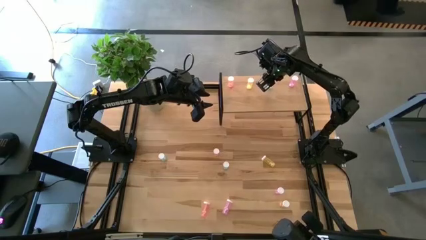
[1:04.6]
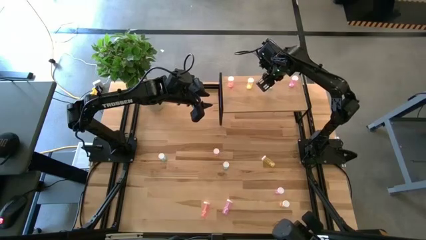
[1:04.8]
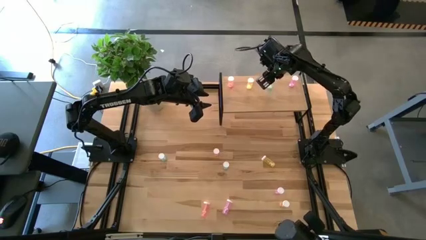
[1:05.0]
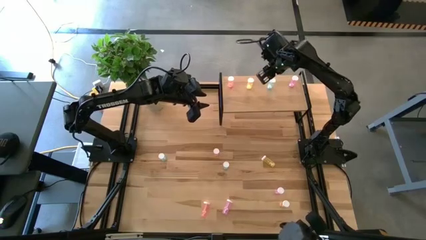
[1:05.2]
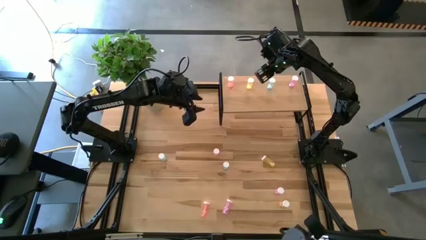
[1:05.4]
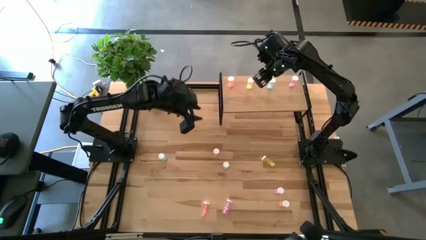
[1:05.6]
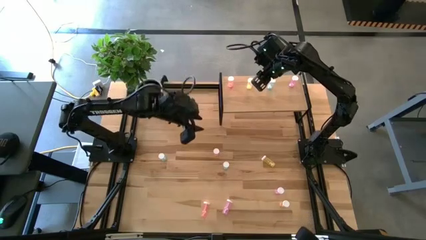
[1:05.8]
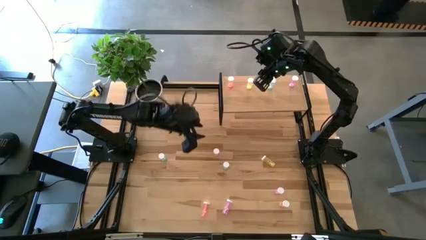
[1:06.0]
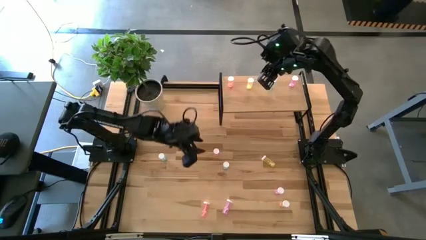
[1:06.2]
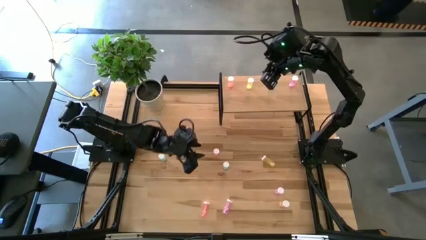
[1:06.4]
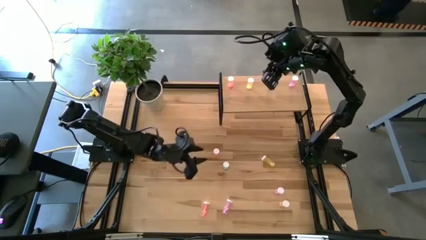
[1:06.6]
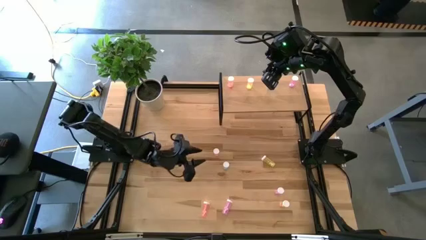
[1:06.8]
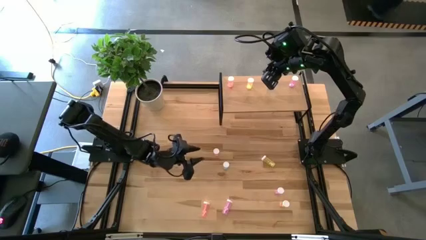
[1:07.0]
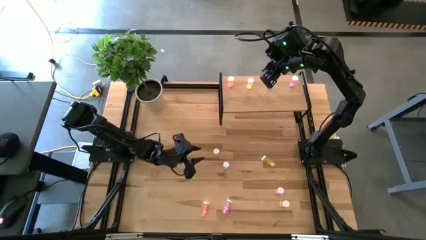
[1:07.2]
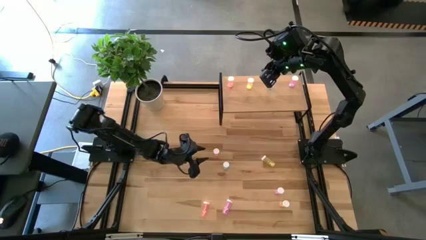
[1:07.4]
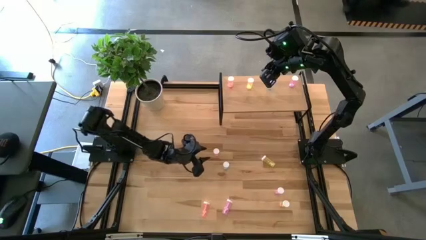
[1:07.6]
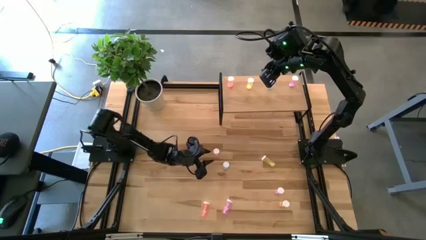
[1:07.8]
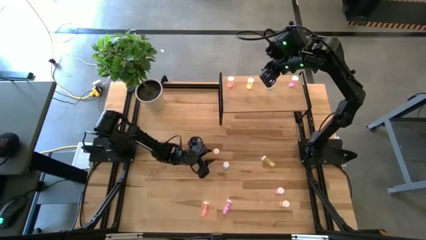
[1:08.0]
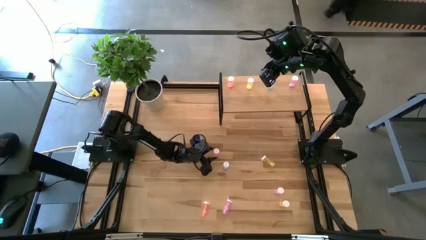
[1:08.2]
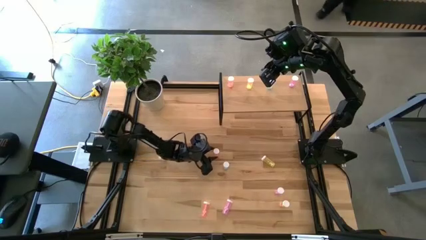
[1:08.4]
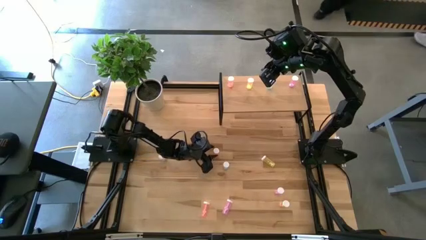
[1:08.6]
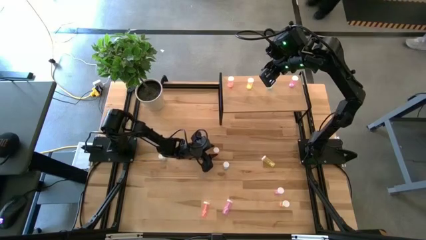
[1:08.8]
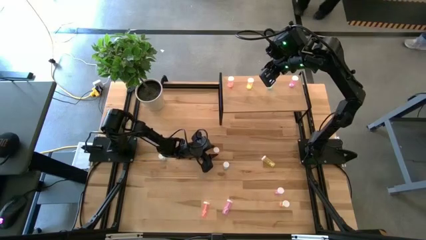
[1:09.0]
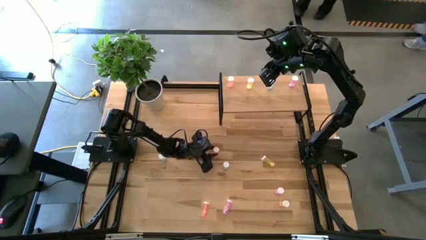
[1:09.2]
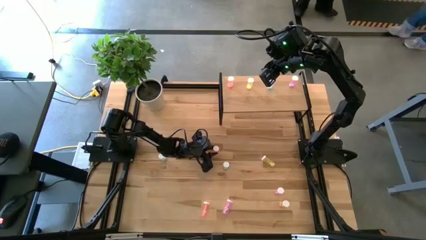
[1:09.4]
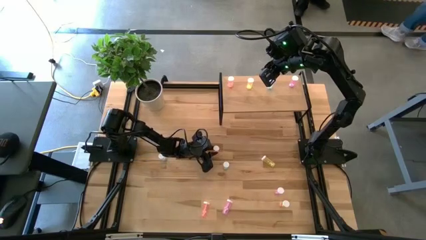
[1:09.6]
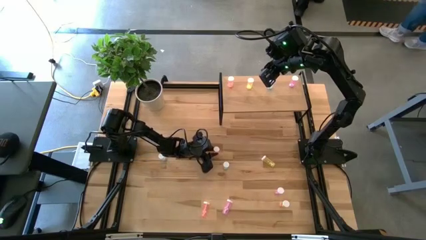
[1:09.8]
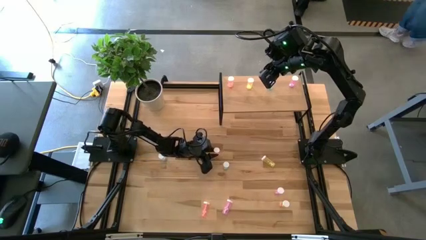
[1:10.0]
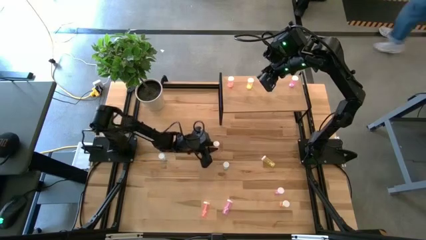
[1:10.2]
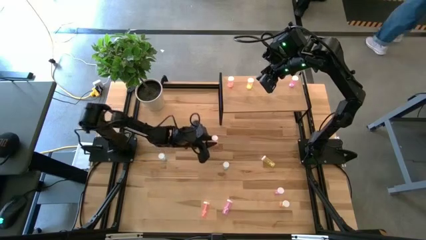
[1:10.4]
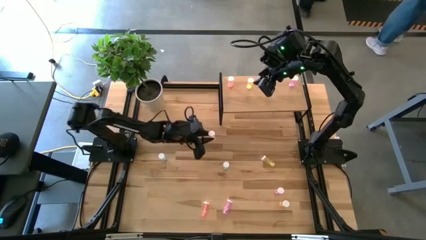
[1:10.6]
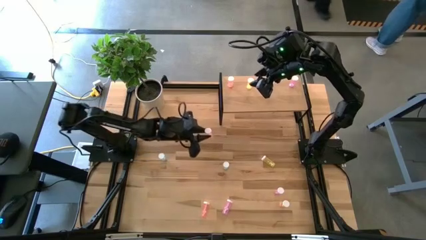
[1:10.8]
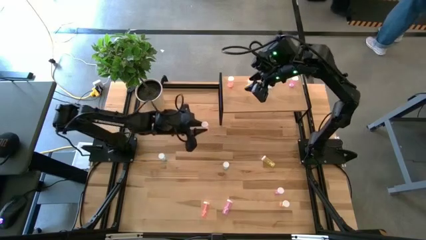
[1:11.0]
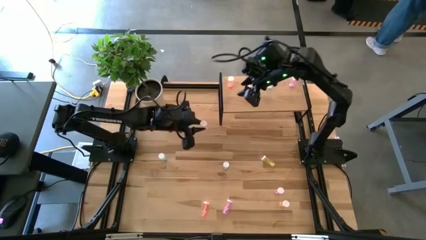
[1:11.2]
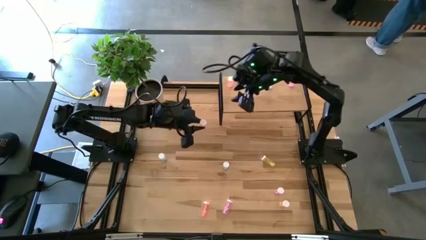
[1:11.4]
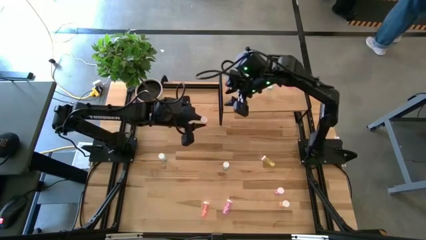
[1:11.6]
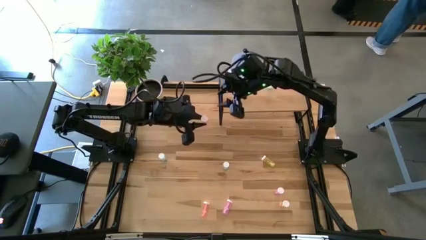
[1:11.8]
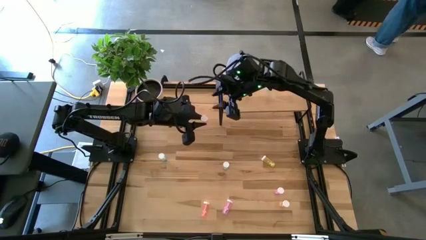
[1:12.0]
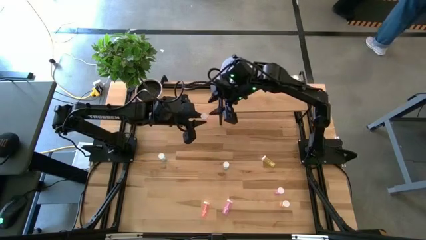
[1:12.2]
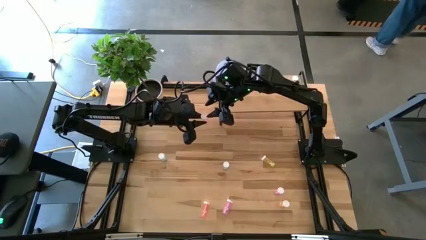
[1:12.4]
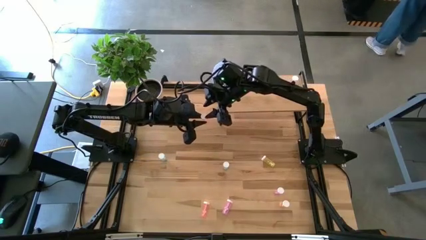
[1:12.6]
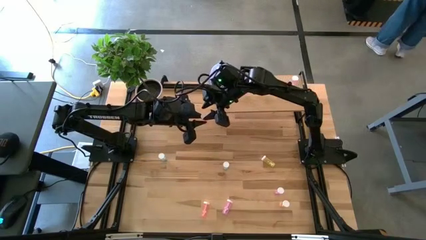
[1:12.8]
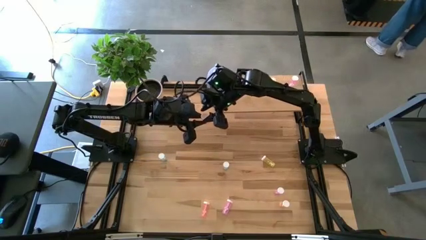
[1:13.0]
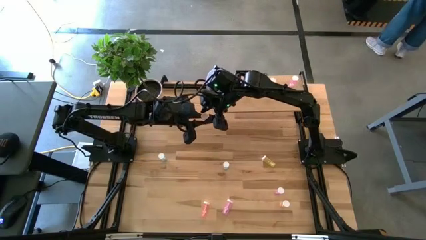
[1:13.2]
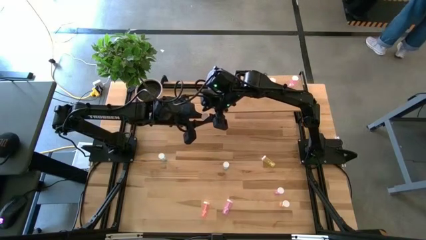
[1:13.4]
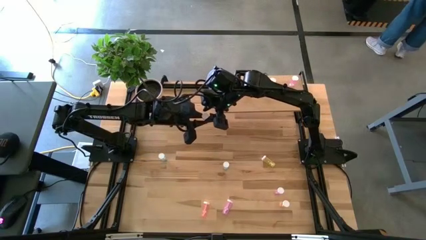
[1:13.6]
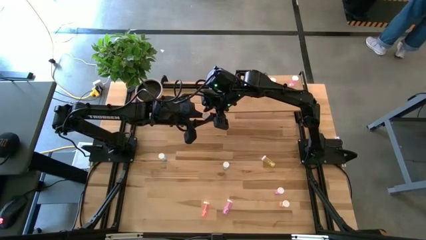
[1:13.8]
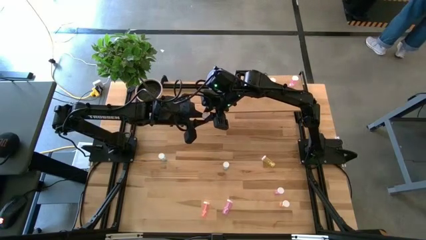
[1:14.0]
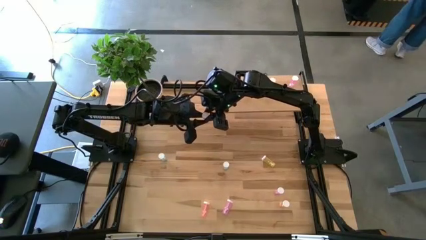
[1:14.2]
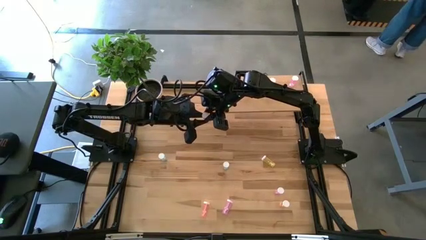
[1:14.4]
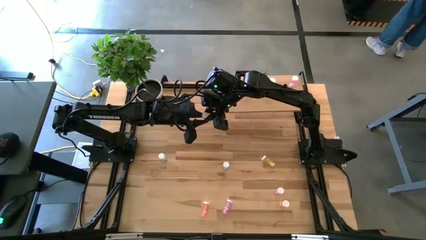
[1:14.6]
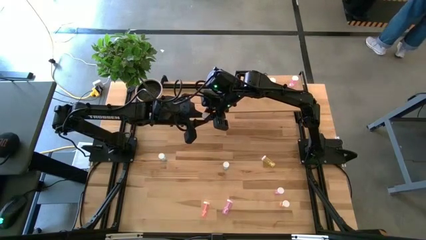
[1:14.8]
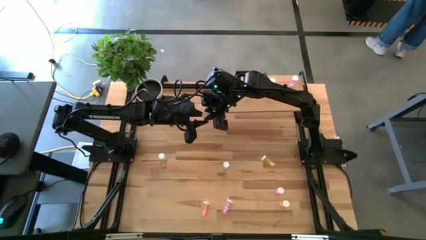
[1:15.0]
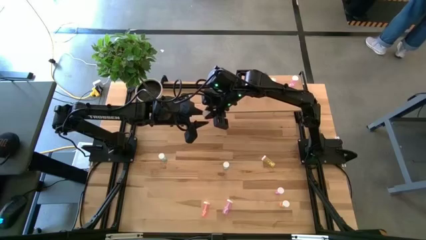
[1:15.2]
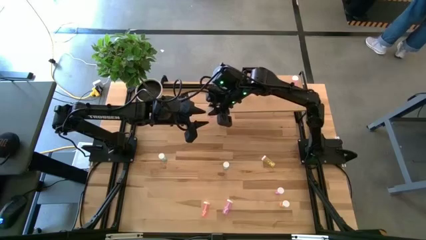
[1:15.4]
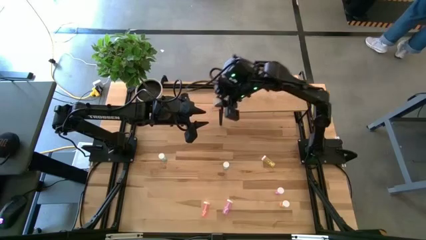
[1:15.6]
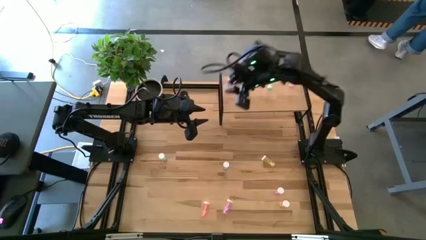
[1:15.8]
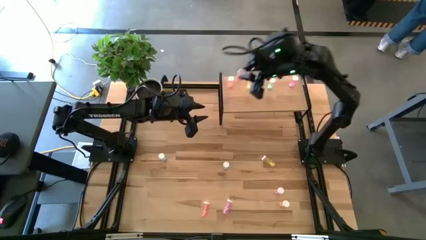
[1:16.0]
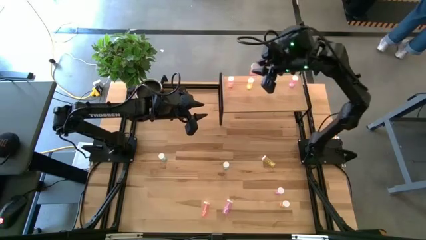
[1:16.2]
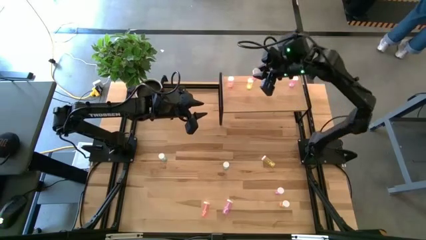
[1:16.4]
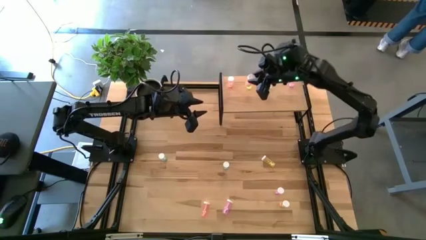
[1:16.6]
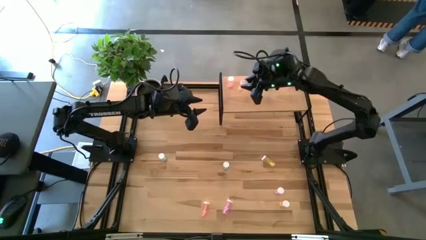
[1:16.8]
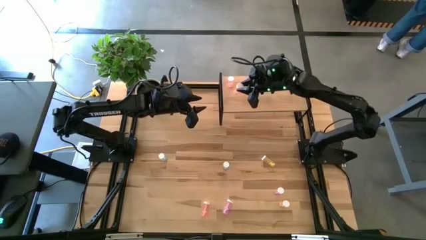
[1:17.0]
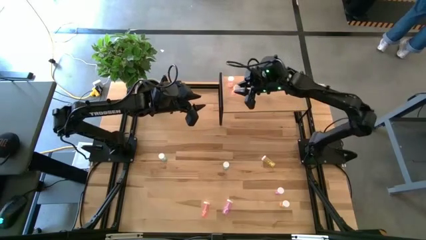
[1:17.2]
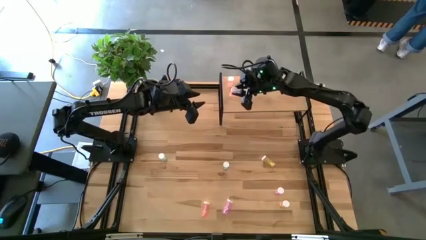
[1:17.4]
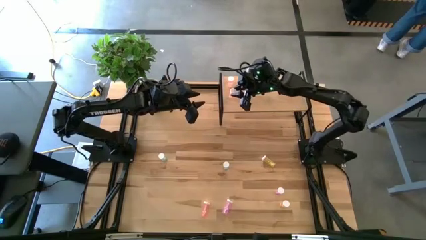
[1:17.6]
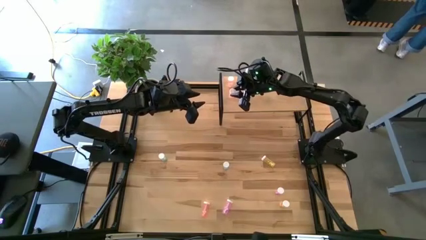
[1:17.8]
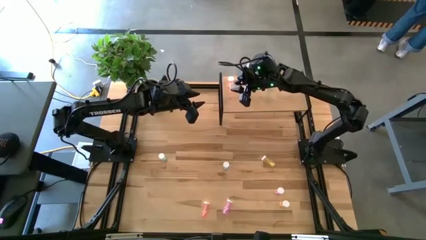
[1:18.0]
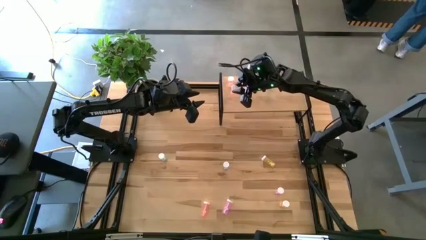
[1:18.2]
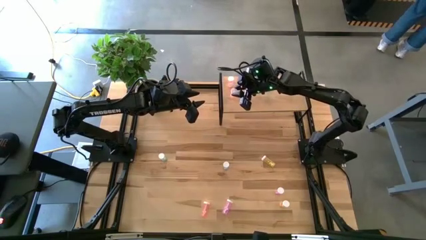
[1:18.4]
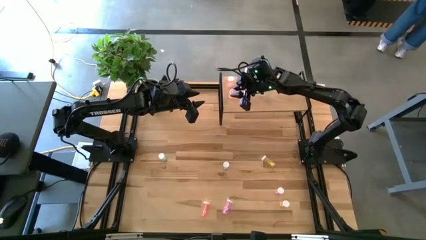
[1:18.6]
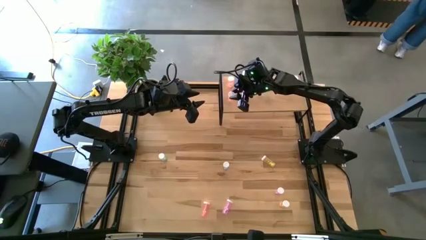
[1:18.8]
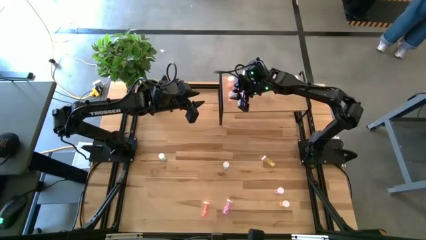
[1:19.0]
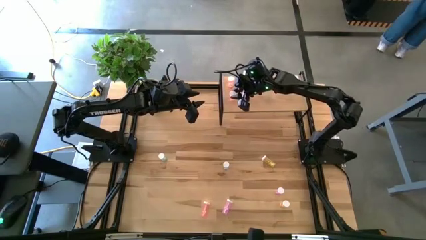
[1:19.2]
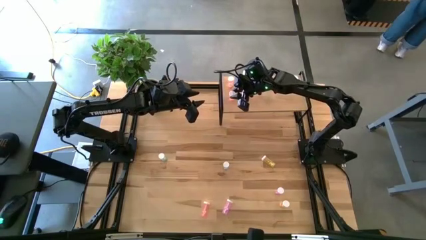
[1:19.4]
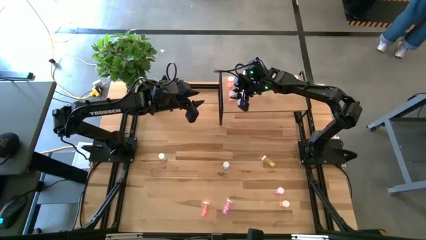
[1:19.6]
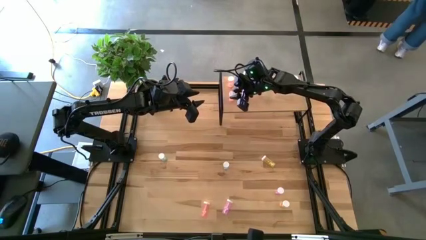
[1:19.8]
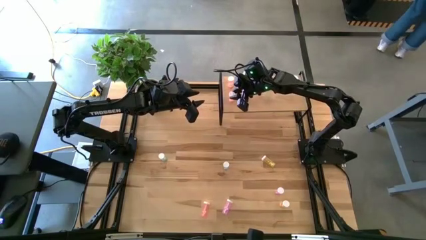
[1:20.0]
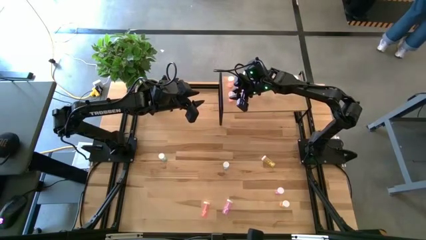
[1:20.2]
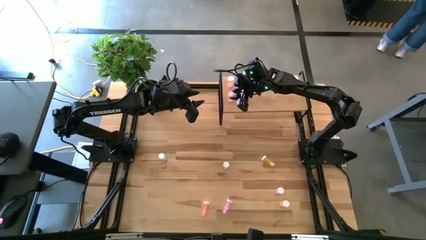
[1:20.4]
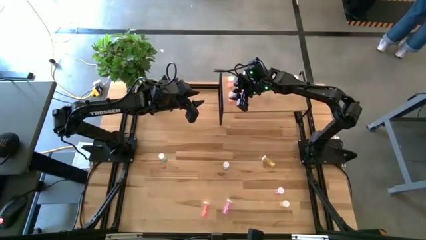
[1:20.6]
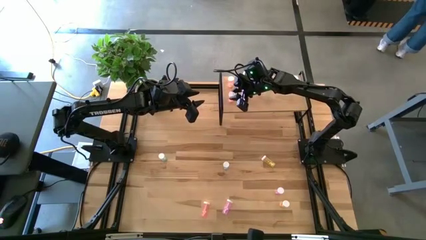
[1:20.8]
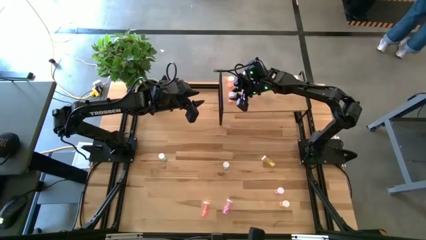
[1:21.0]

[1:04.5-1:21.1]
Task: Pick and place medicine bottles onto shelf by color
Put the top pink pill bottle on the shelf aligned with the other pink pill bottle
